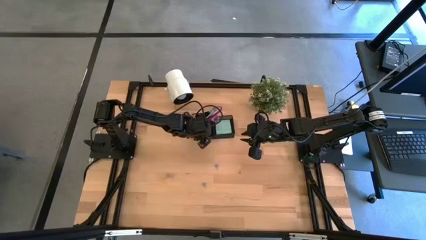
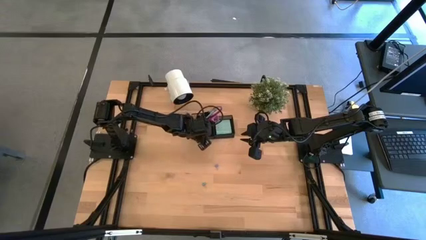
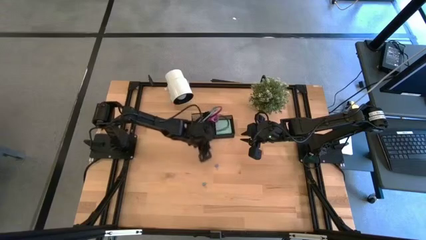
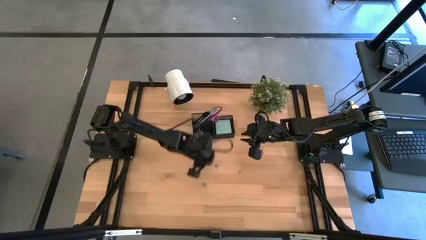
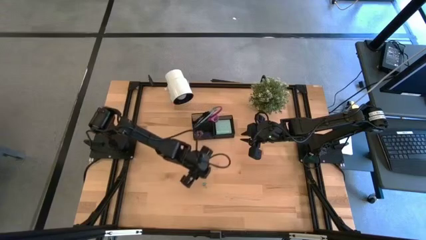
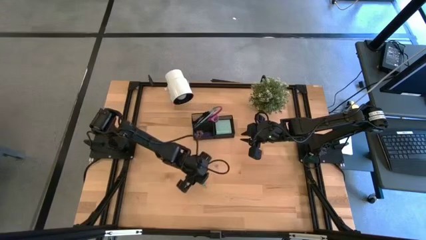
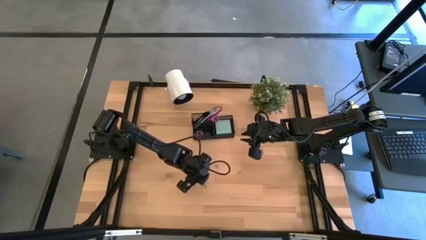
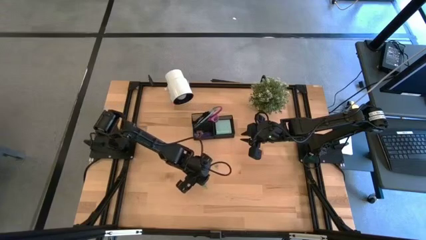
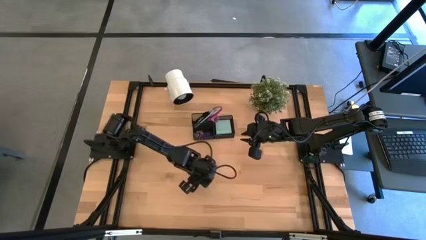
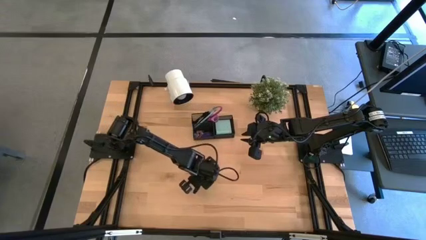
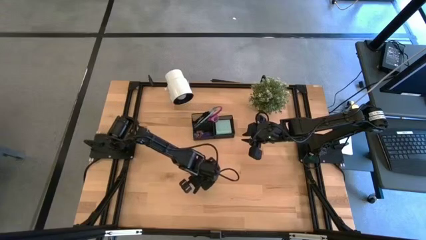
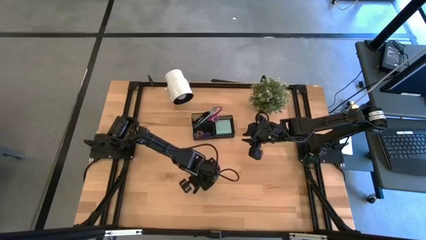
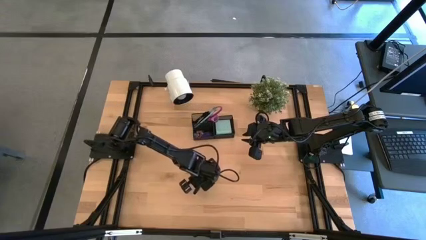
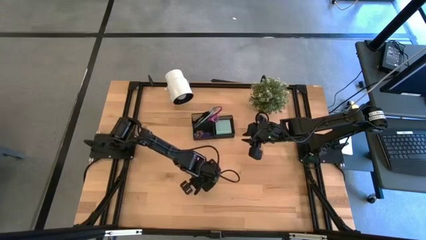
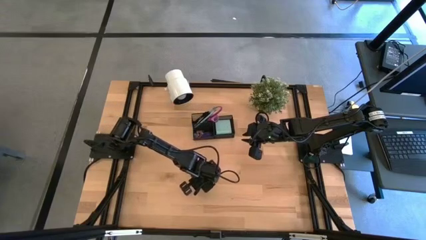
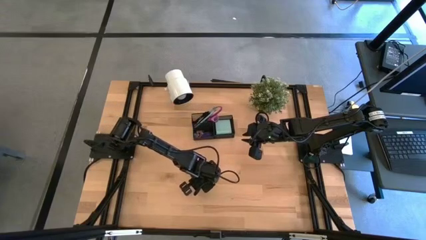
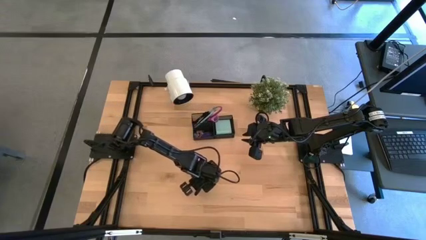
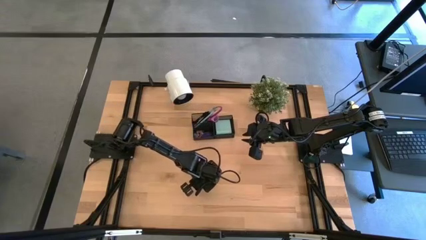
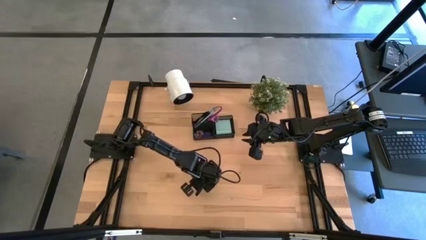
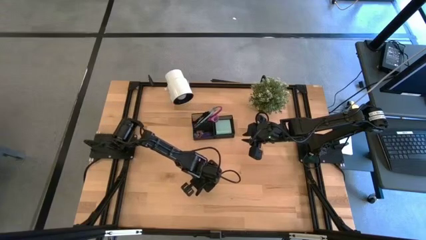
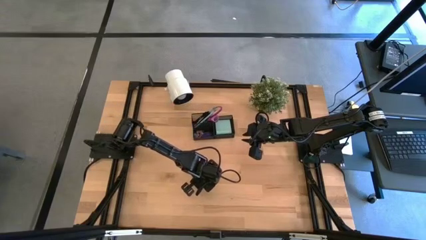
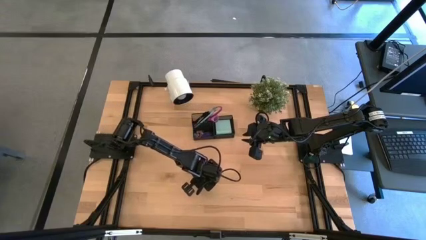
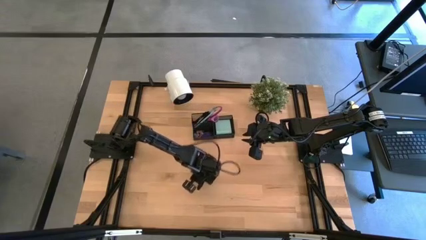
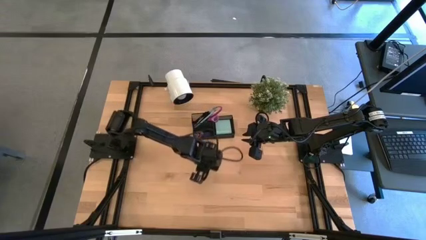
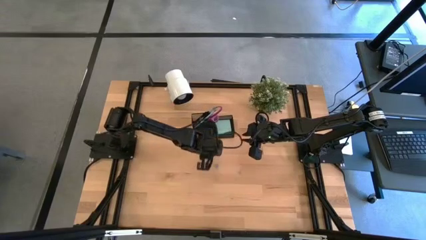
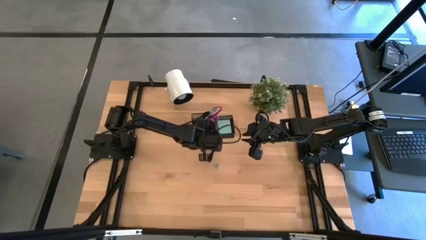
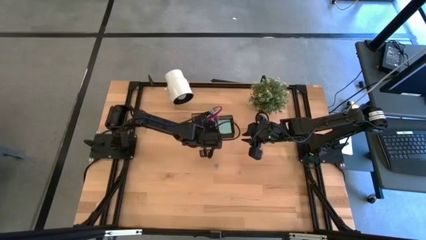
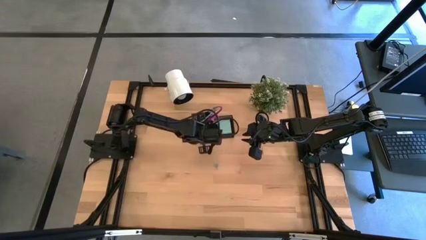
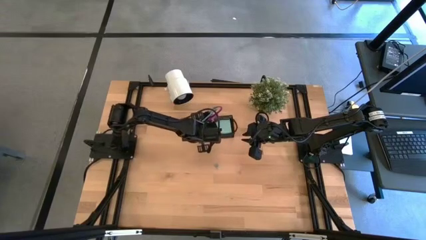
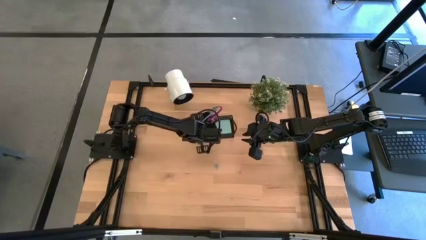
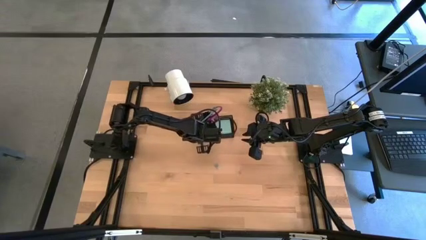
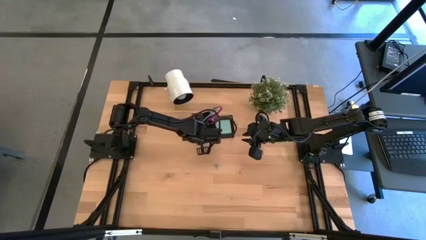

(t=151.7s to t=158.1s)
Task: Pick and place office supplies into organizer
Put the blue binder clip into the black desk organizer

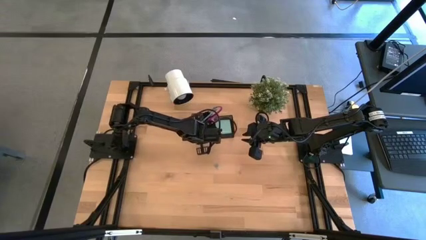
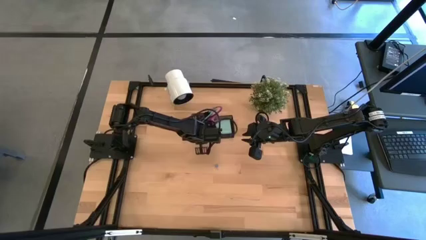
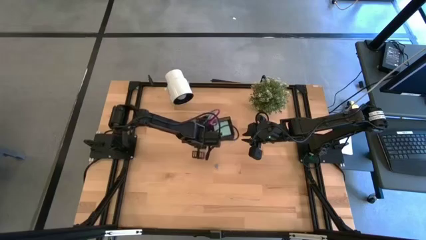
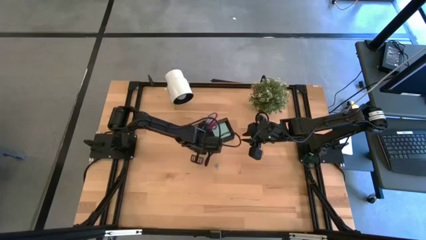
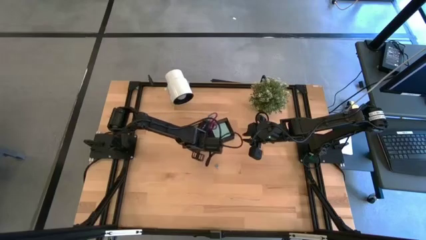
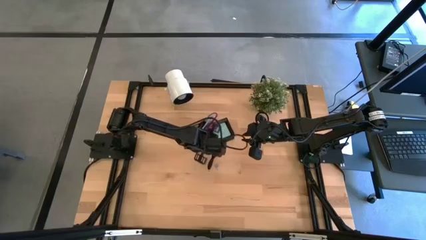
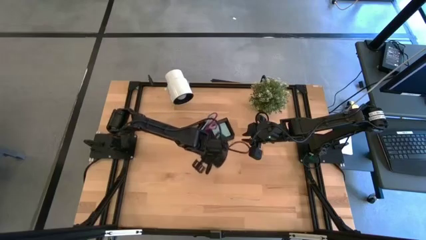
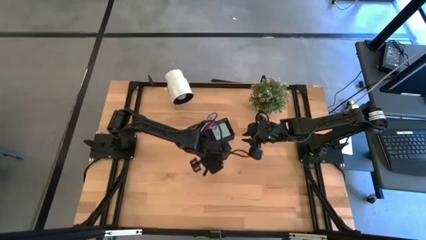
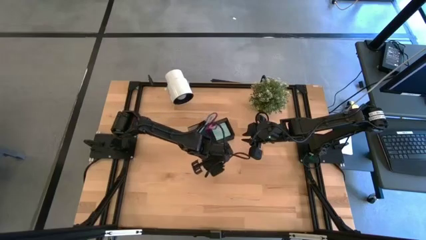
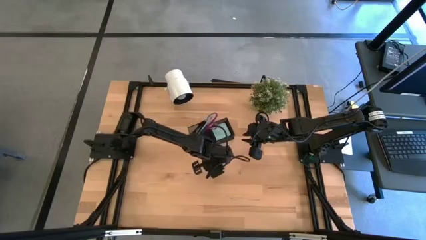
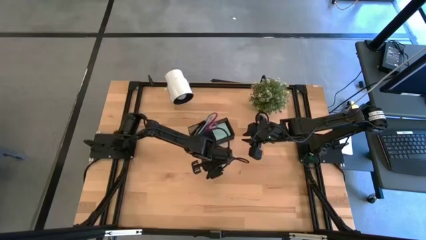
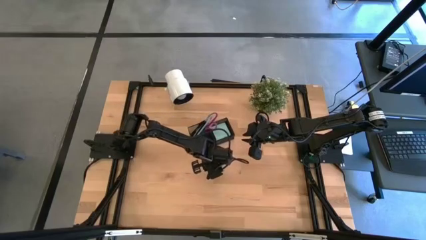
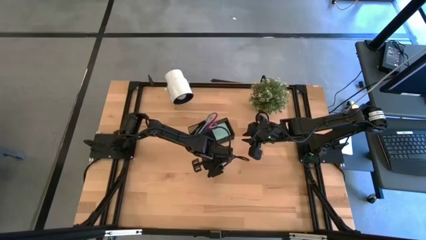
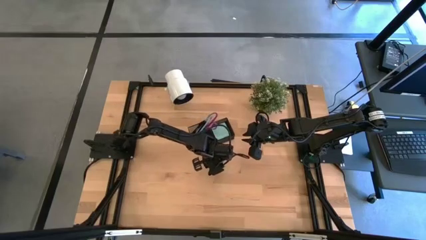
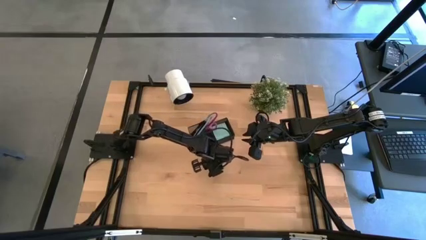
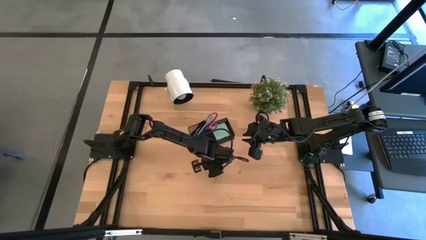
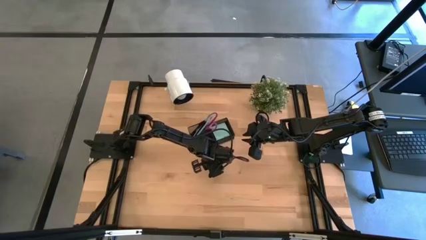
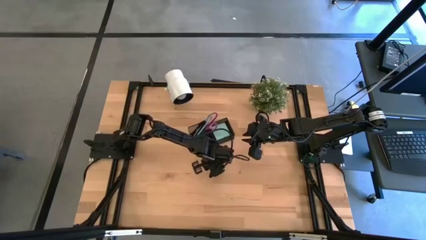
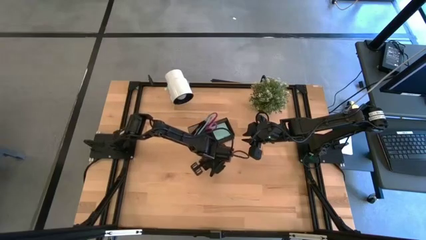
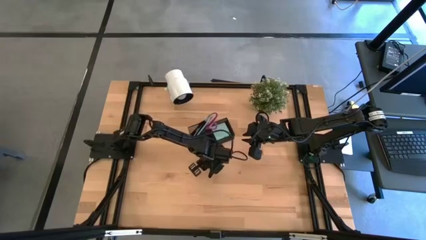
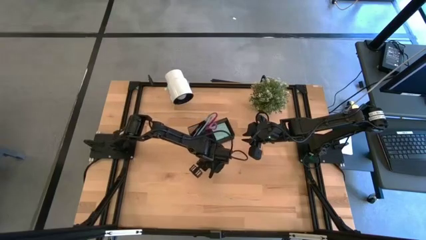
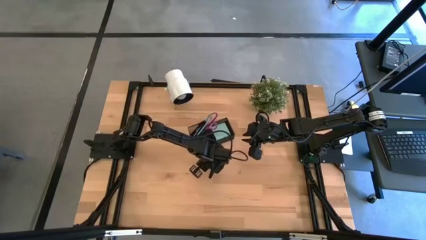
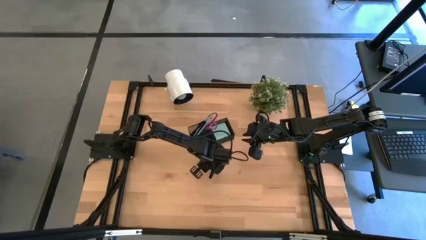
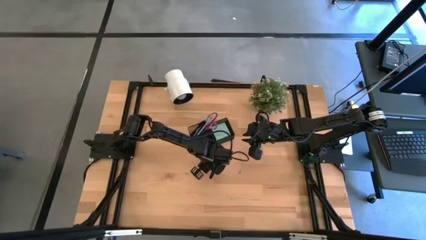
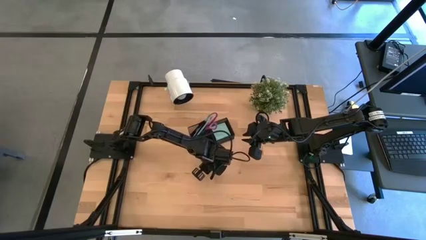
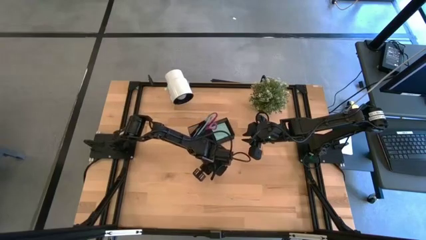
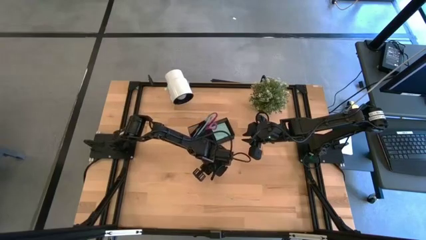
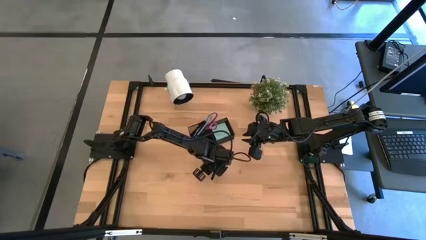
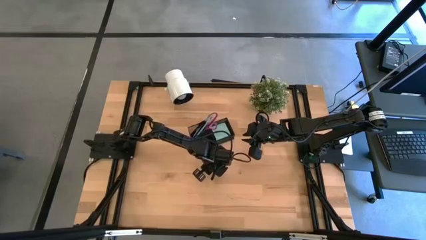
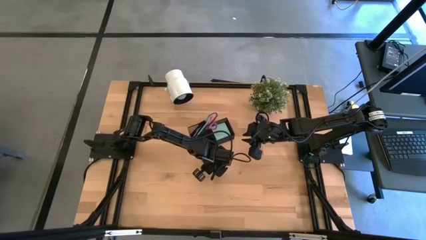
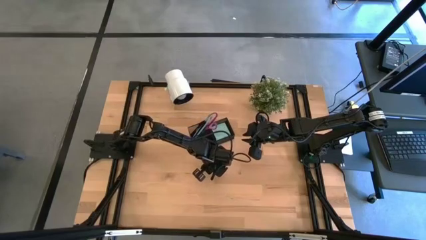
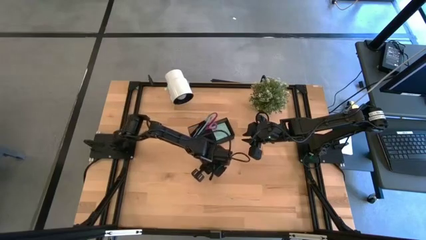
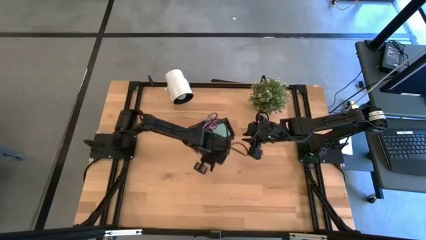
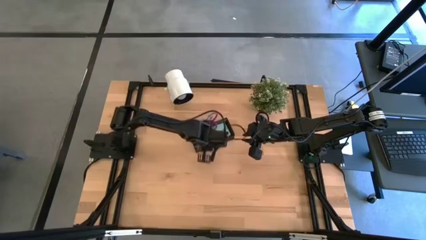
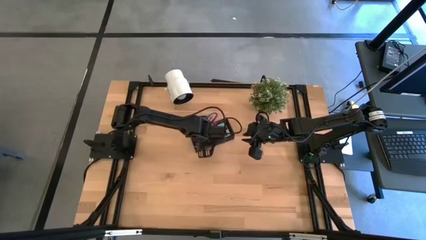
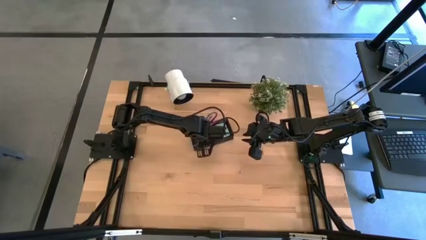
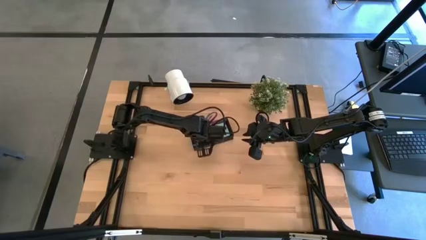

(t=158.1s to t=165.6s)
Put the blue binder clip into the black desk organizer

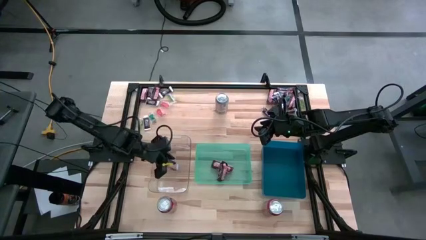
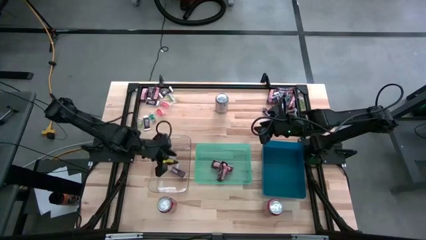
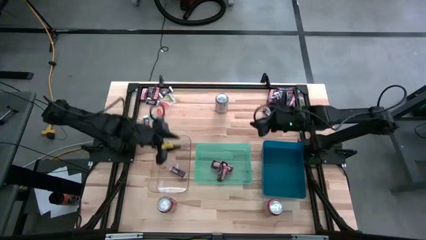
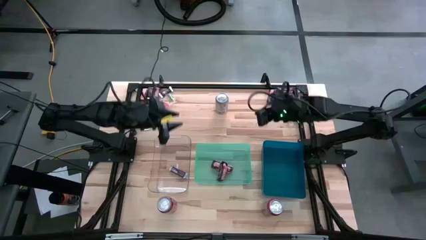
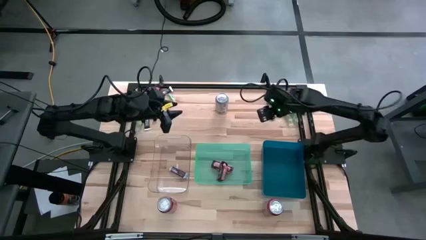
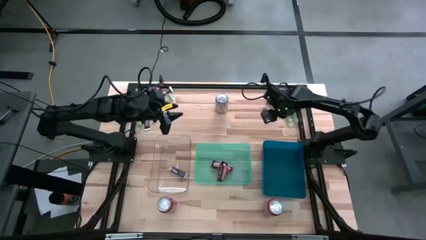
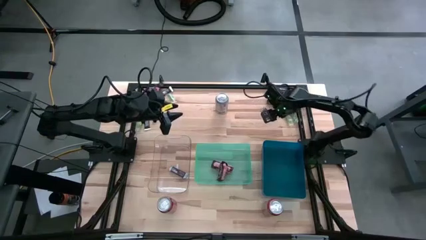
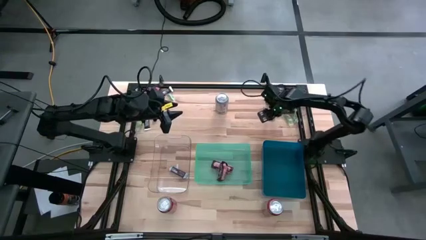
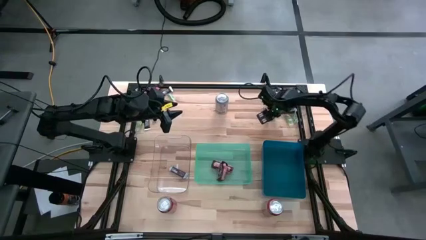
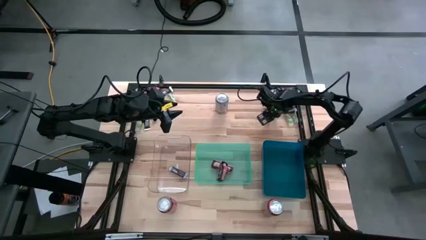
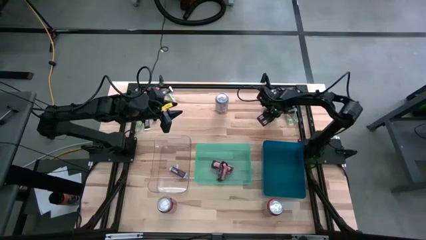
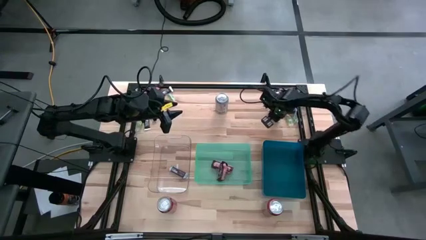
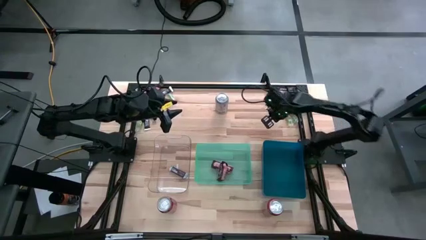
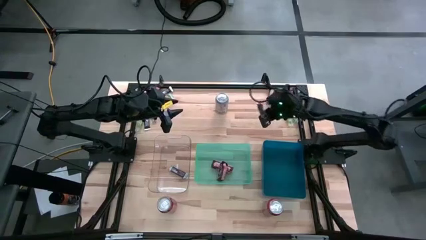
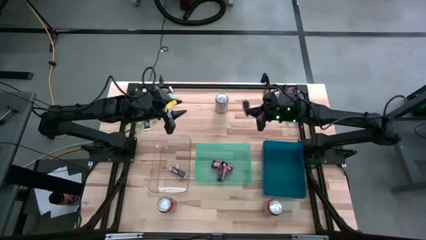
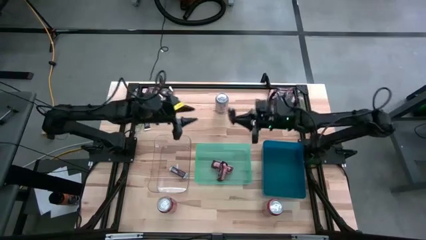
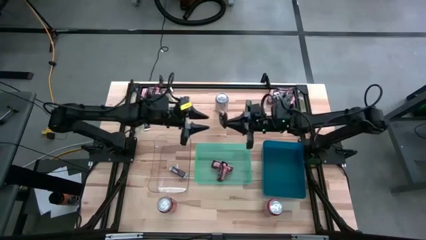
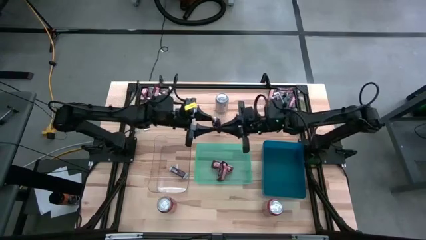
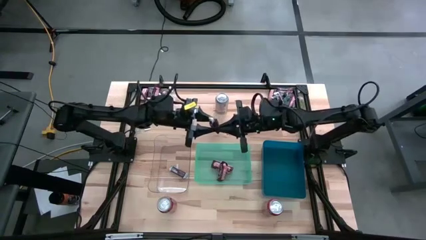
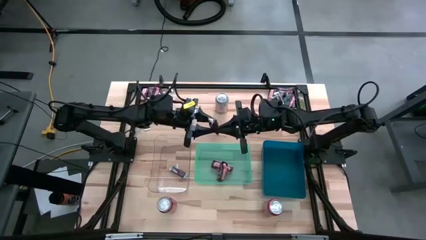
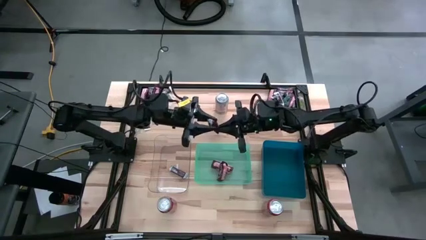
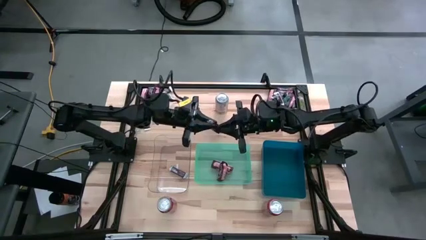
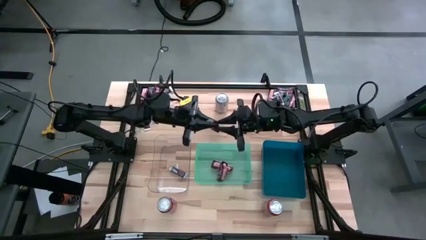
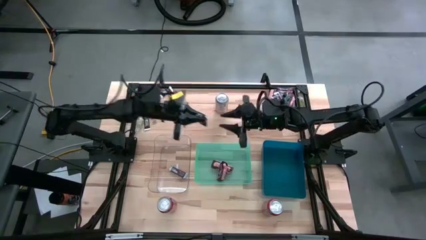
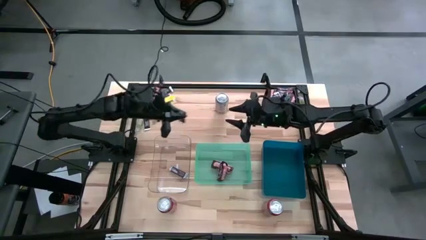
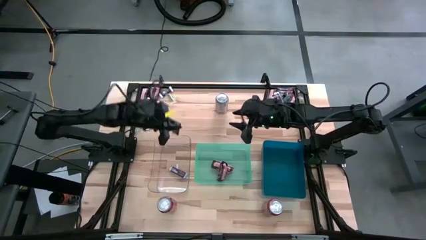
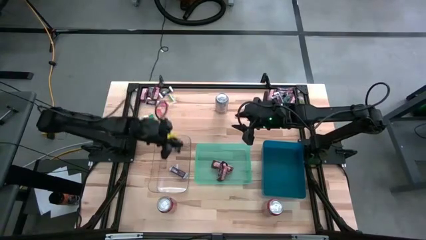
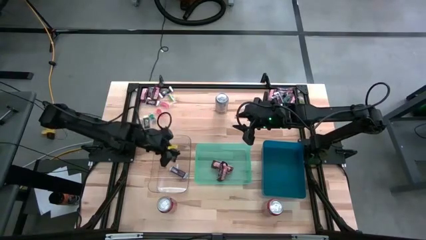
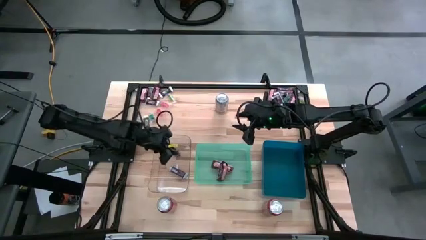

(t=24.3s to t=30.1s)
Task: Organize candy in baskets
Put the brown white chocolate bar into the transparent bin
